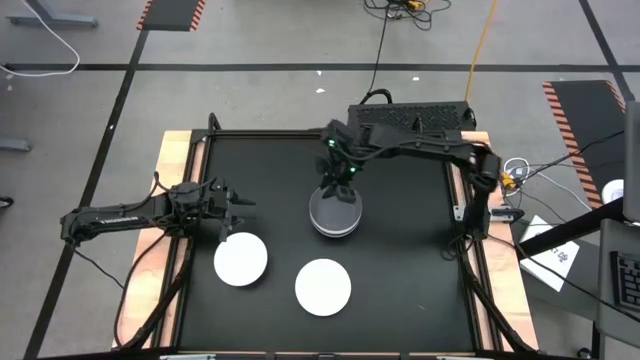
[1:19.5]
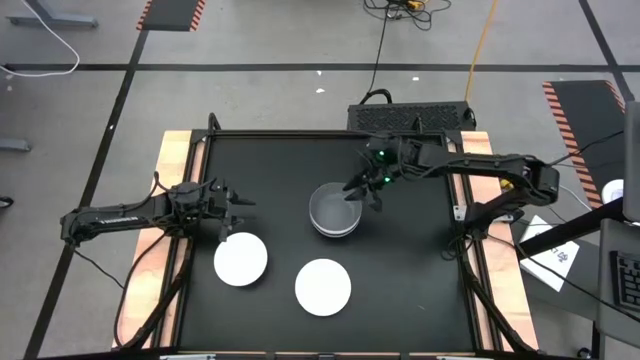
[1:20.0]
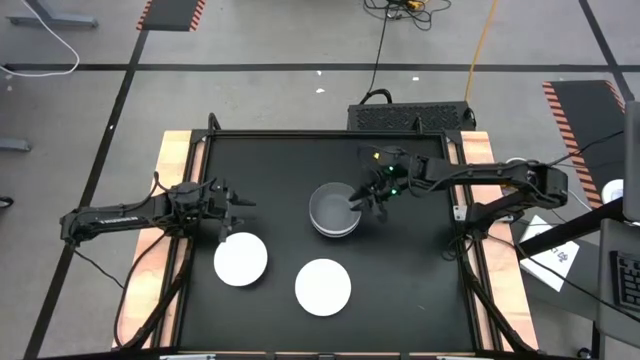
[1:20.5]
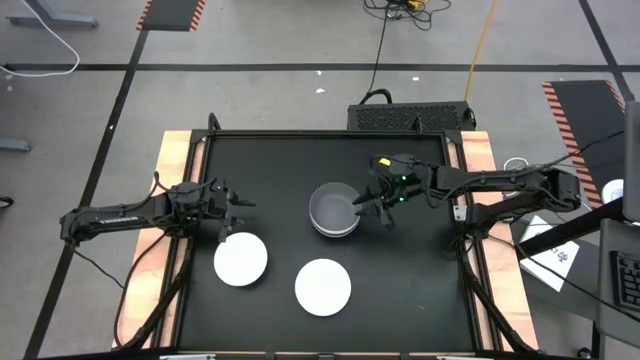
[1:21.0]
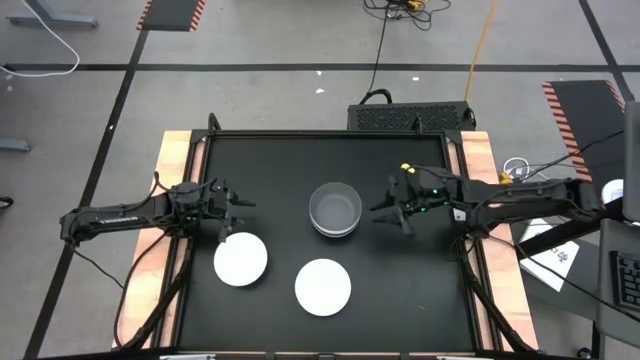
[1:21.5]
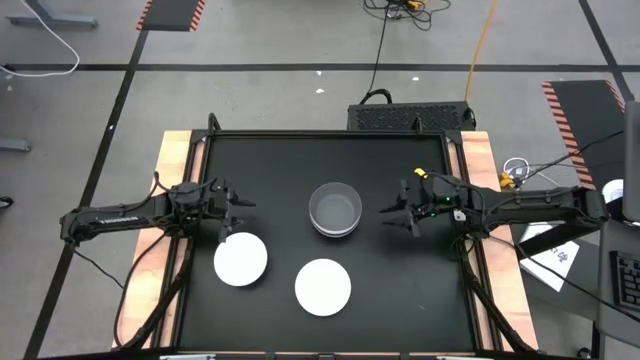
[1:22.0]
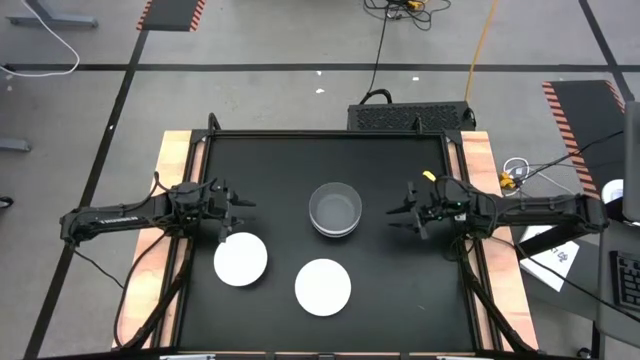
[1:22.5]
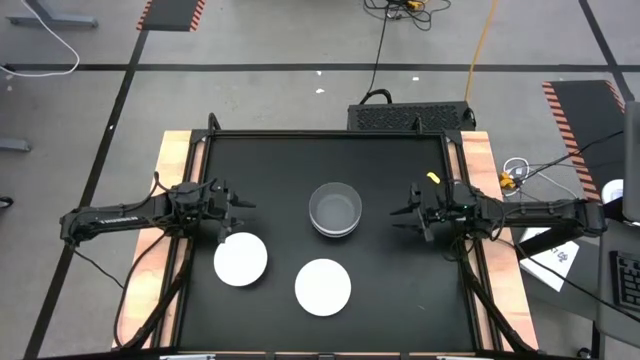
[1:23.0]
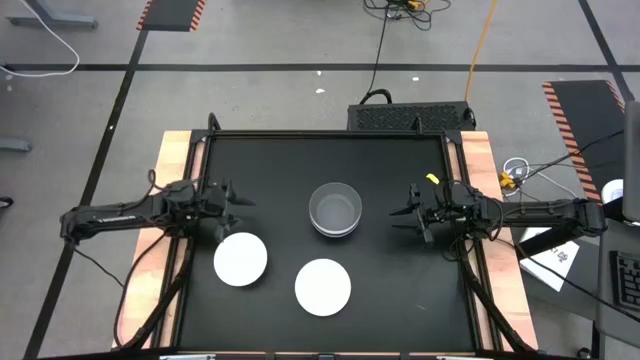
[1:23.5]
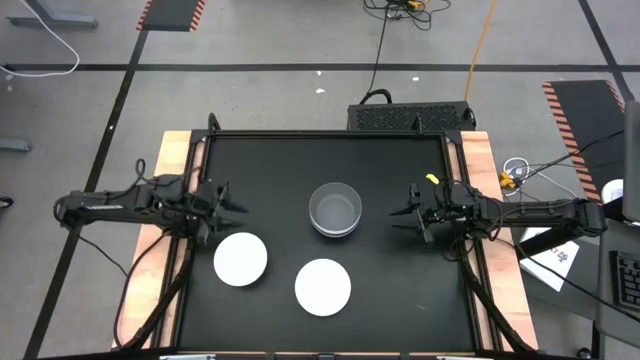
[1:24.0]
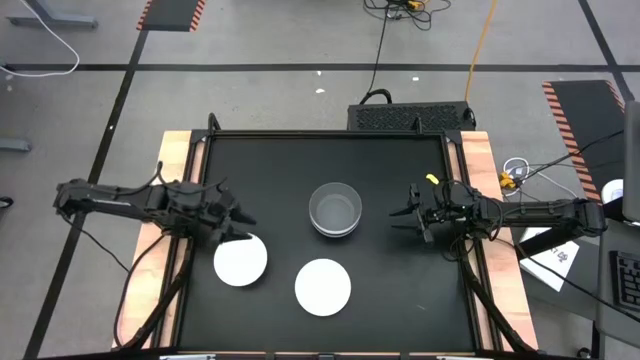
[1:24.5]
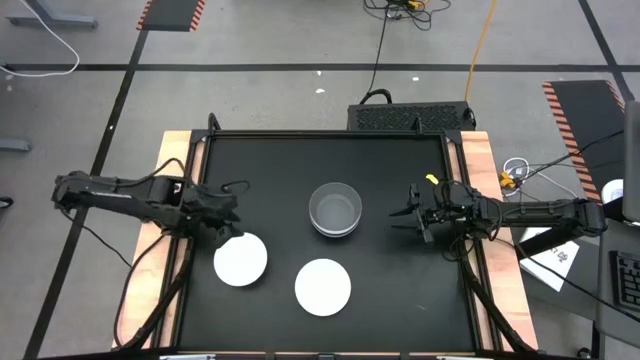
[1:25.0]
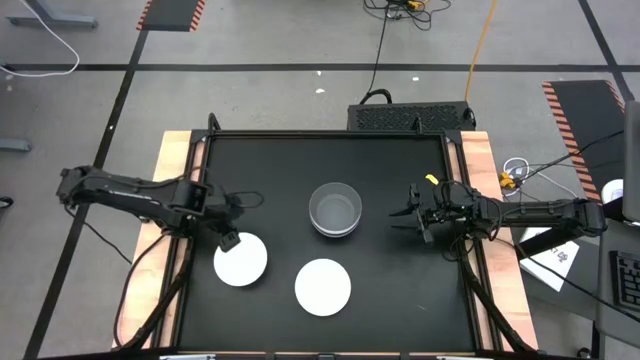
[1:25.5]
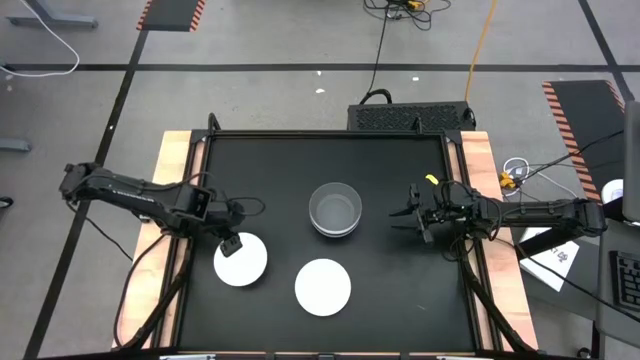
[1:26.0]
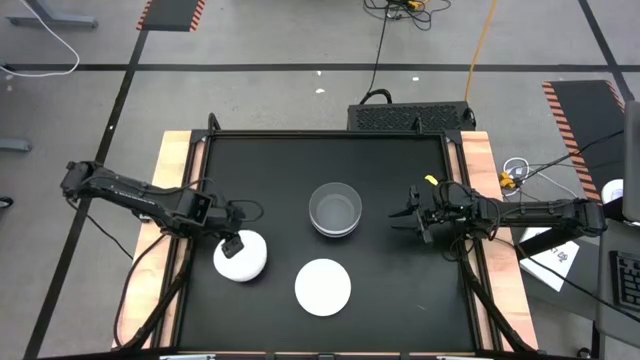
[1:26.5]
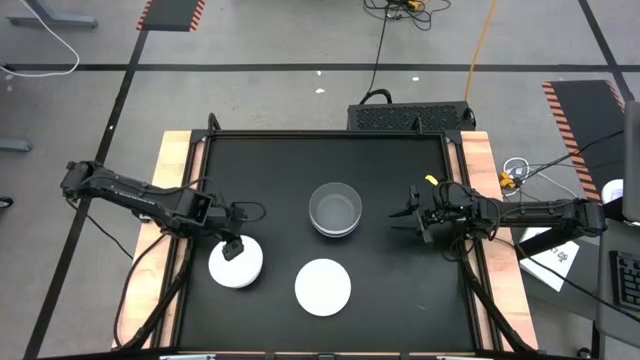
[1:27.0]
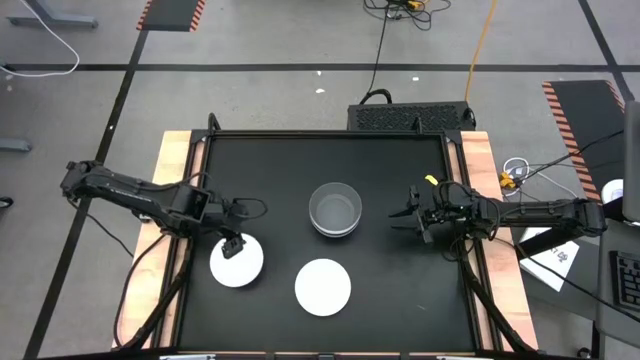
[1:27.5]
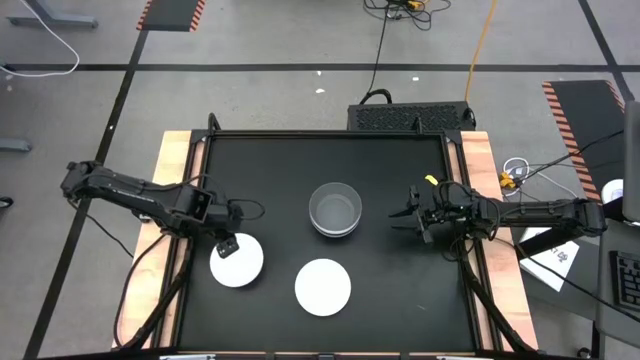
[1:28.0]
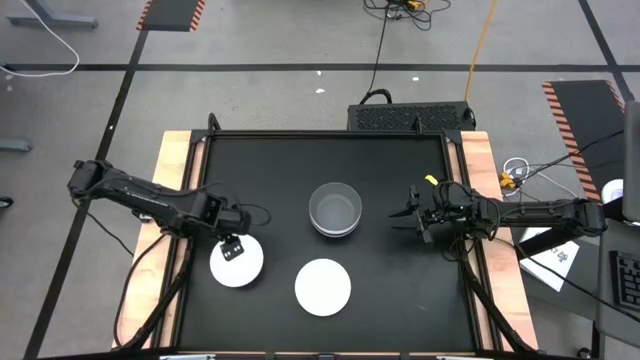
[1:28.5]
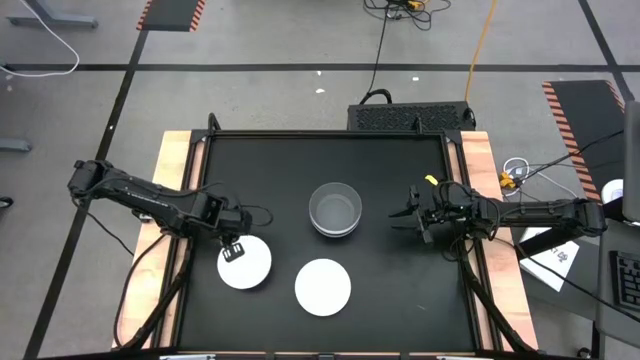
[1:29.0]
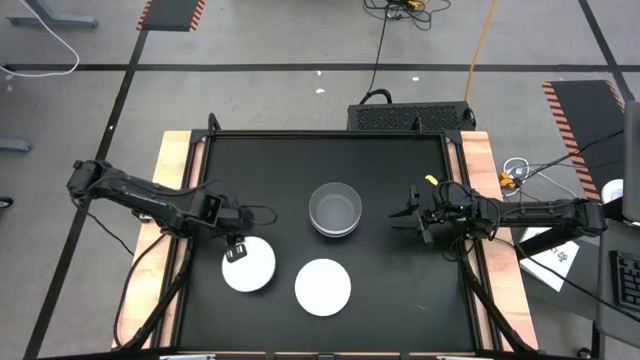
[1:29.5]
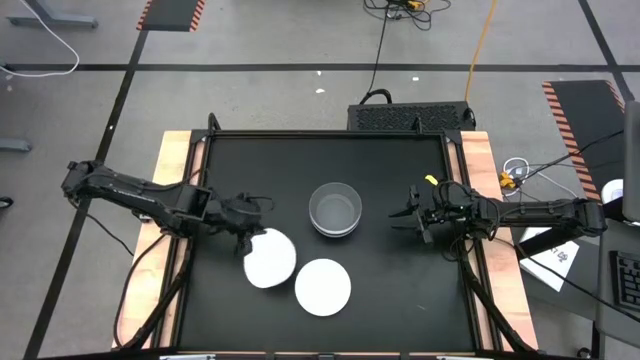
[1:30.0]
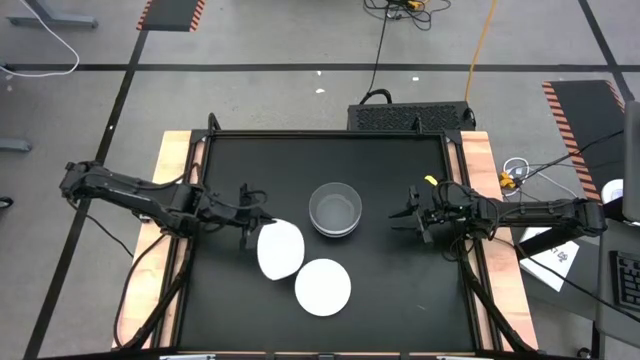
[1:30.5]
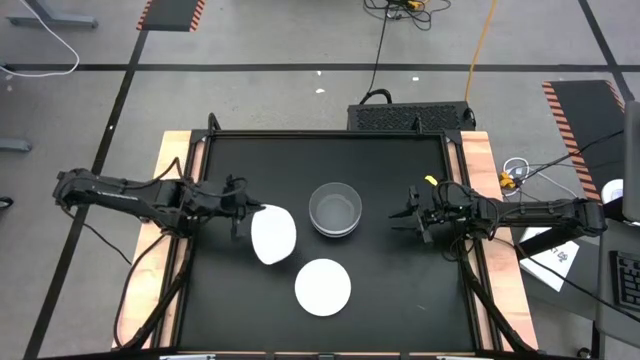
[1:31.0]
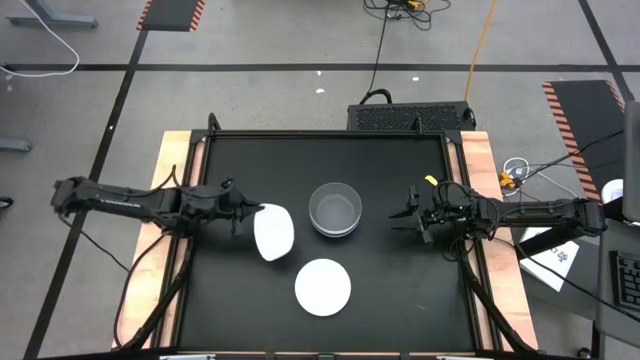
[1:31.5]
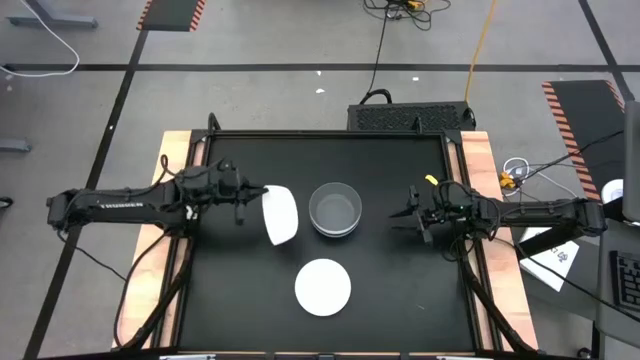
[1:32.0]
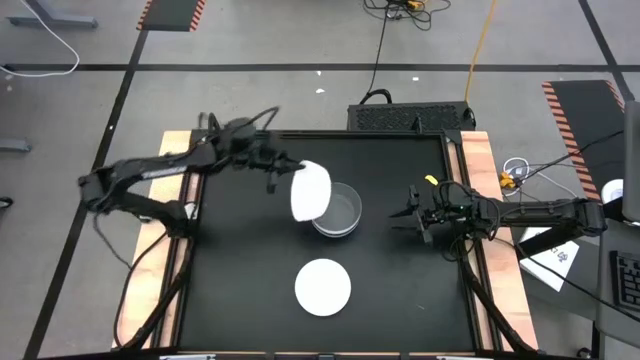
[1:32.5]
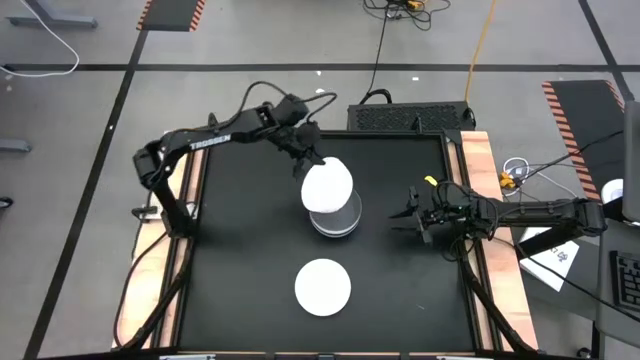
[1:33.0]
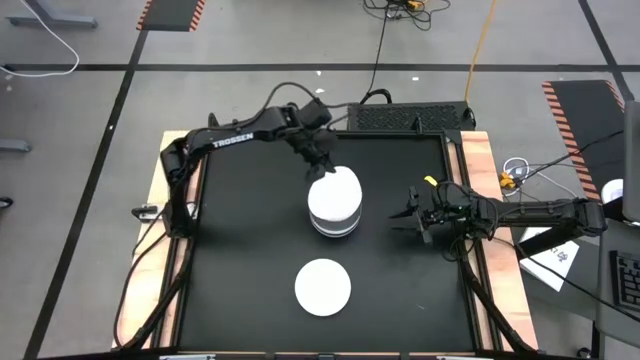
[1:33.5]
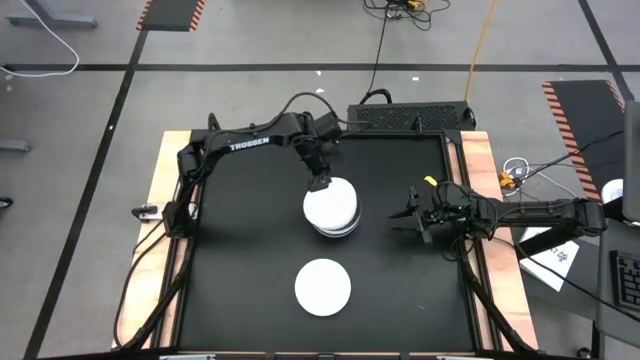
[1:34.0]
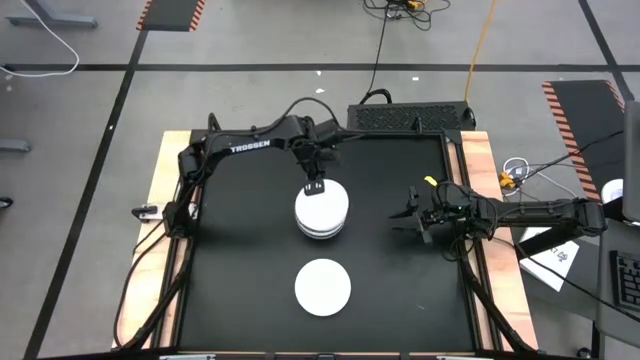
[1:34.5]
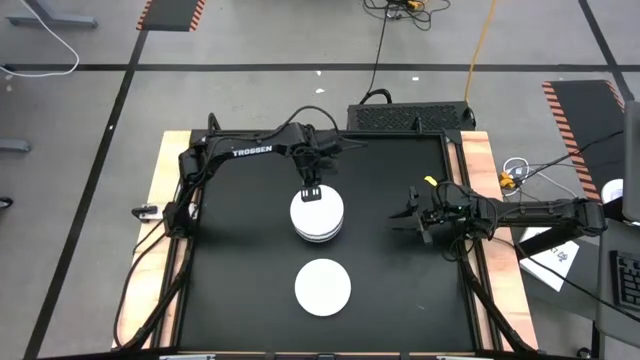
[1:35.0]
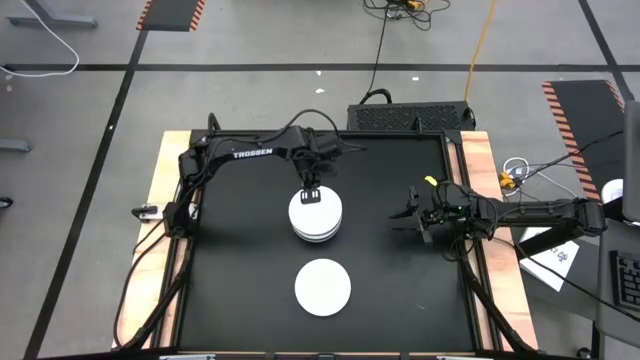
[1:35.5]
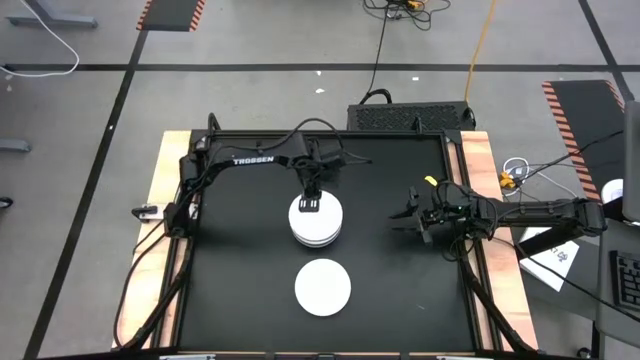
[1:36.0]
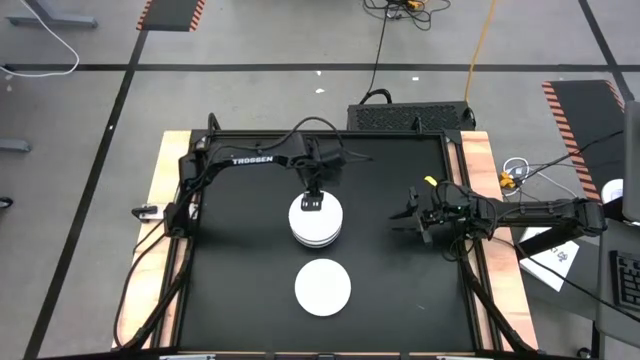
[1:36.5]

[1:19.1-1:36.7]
Task: Nest bowls inside each other
Stack the left white bowl on top of the dark gray bowl

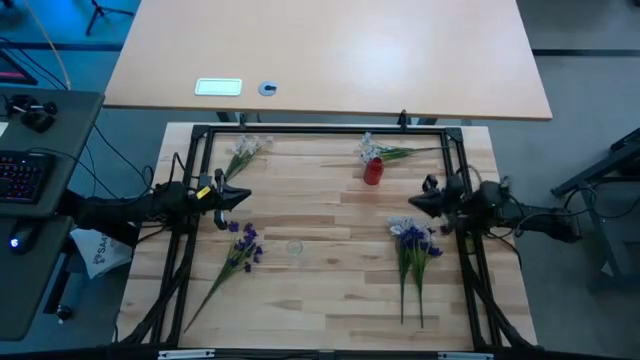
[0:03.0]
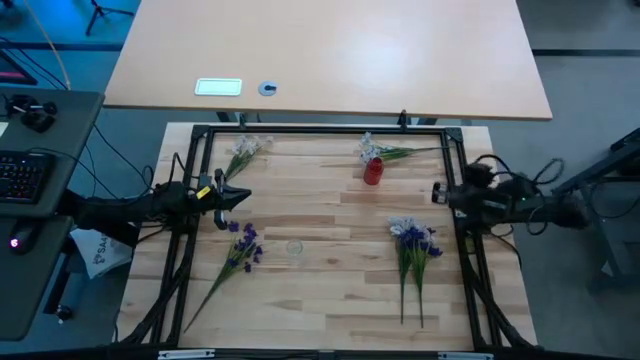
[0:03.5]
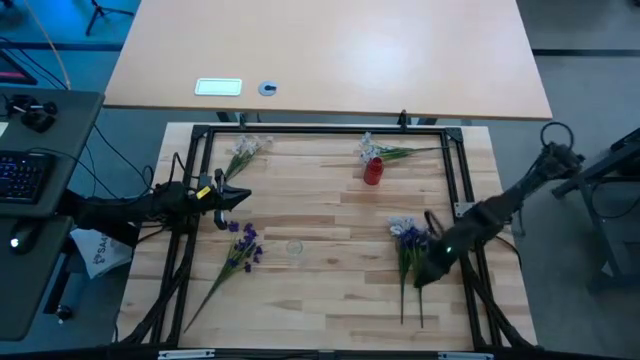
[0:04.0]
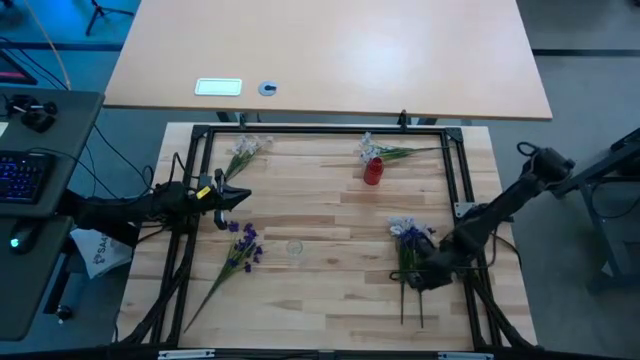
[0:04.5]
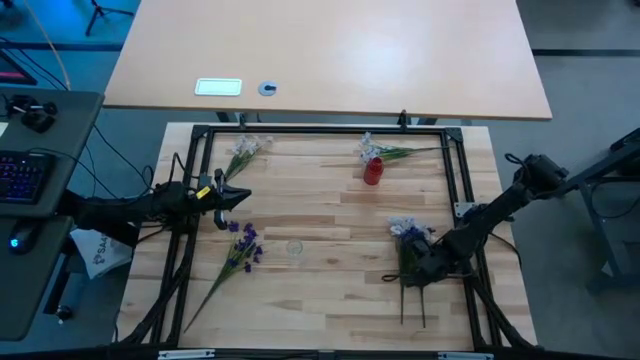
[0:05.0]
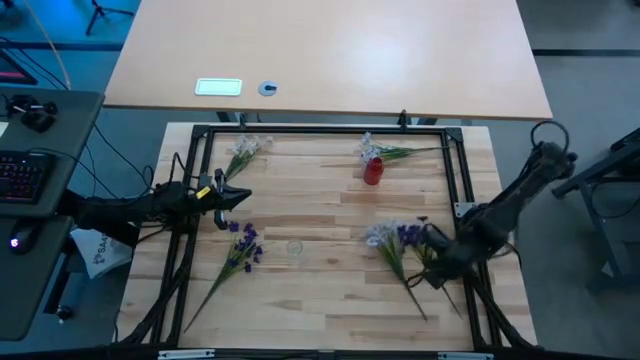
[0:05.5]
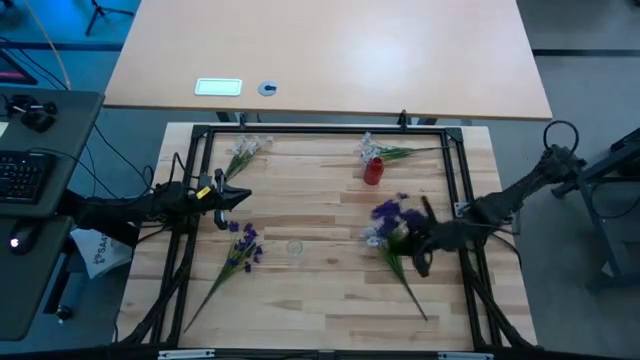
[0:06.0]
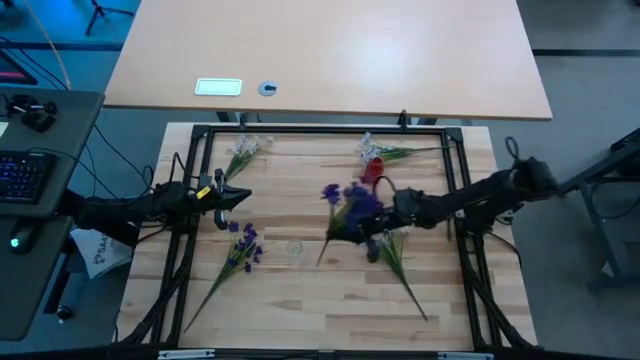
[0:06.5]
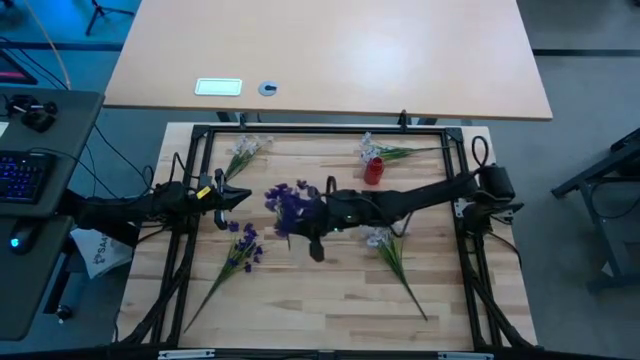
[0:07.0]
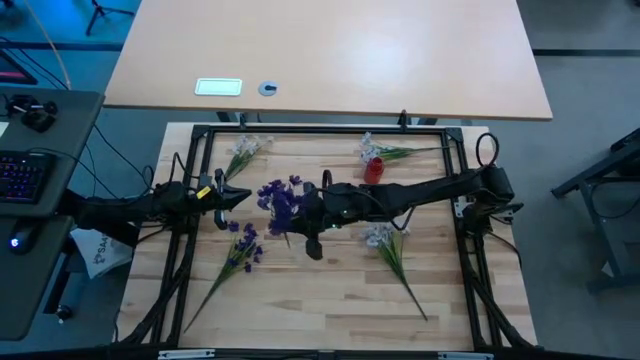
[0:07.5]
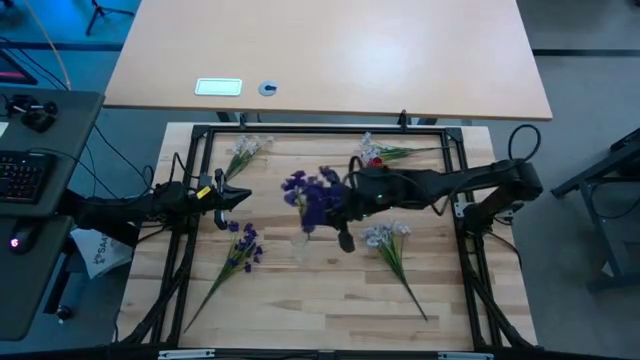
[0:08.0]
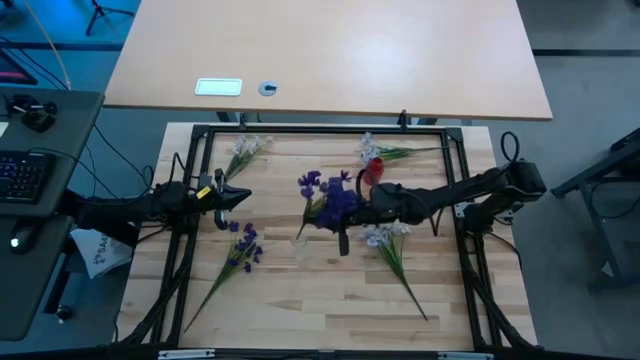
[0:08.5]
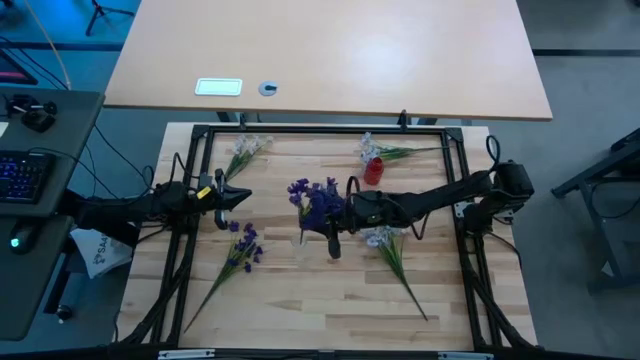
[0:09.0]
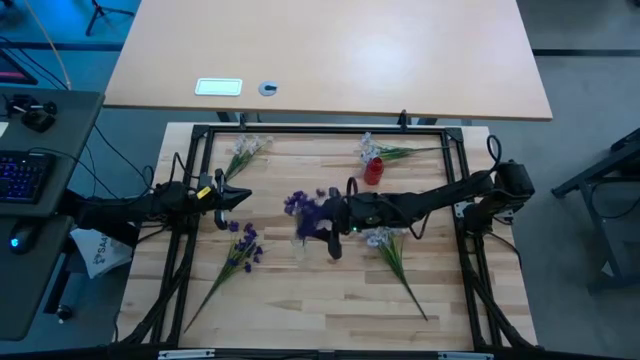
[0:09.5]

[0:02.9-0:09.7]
Task: Sort flowers into vase by color
Put the right purple flowers into the transparent vase
